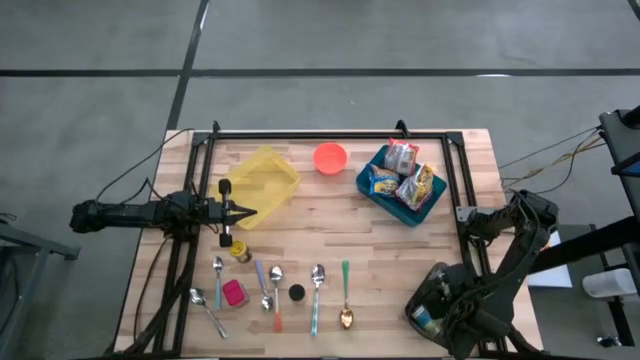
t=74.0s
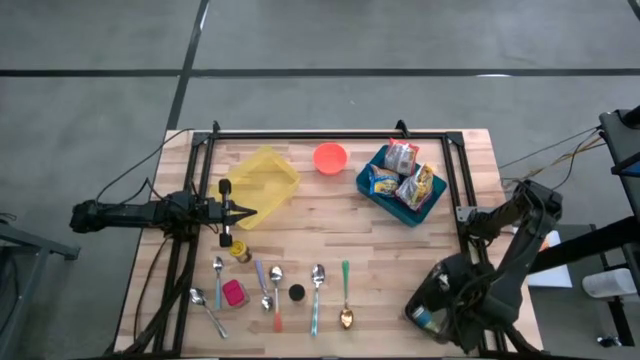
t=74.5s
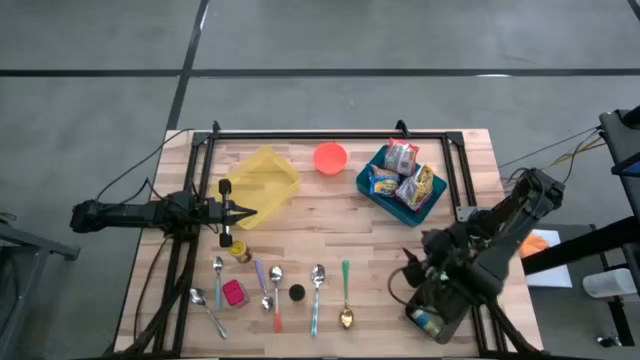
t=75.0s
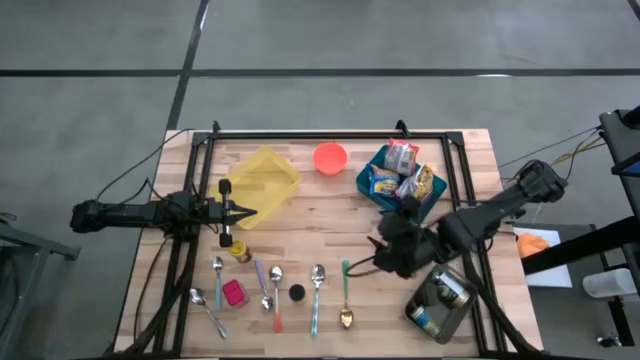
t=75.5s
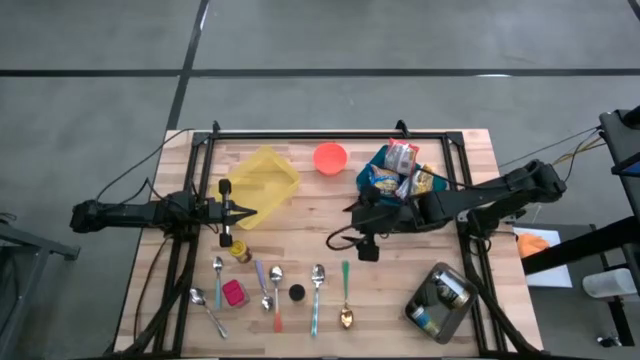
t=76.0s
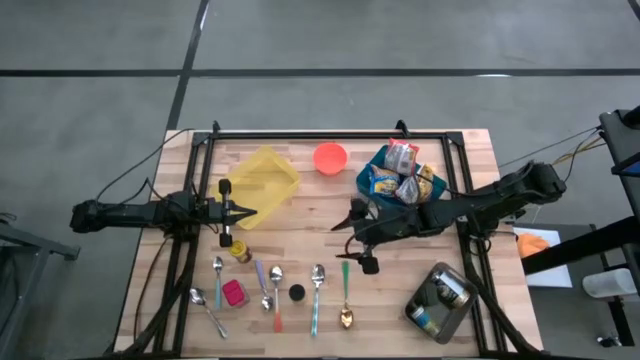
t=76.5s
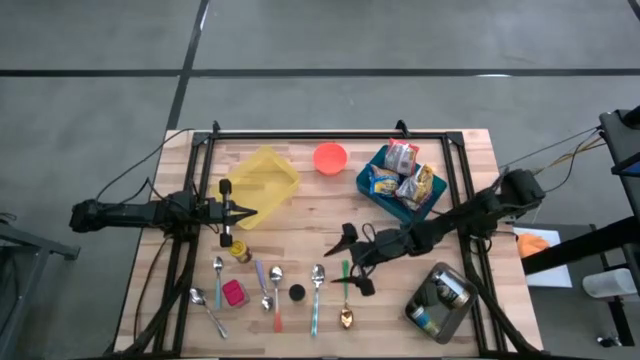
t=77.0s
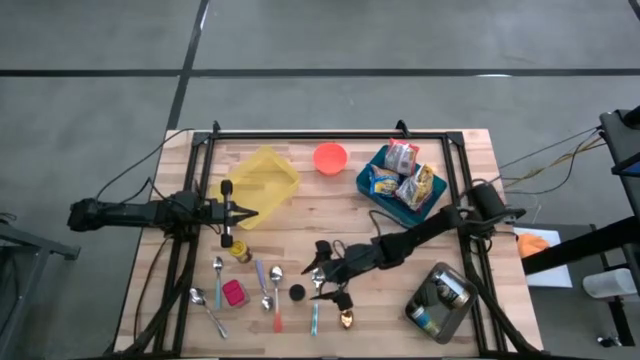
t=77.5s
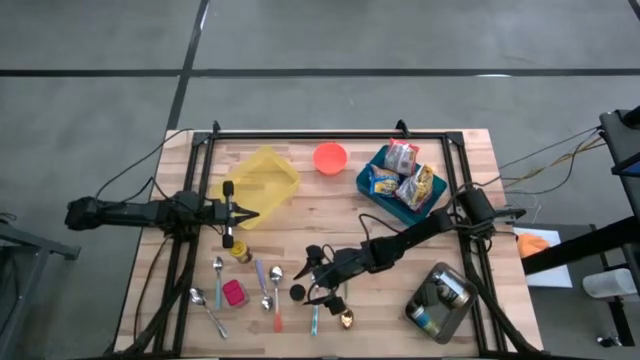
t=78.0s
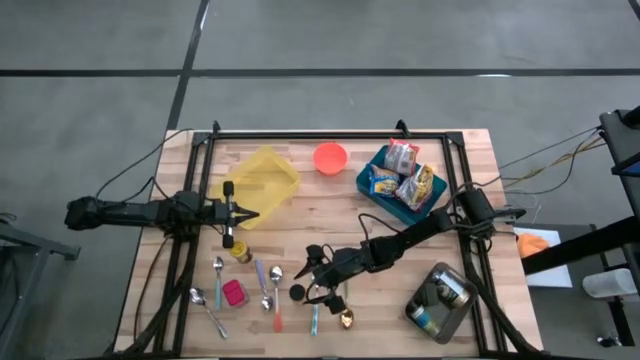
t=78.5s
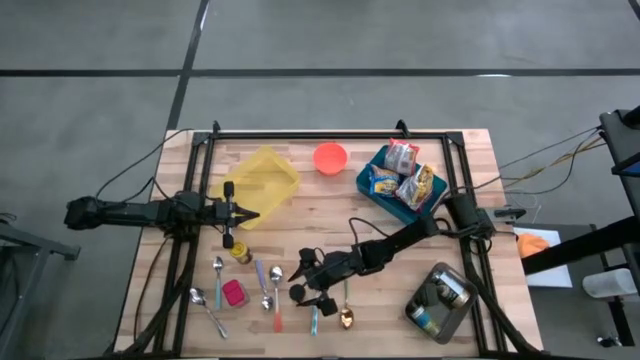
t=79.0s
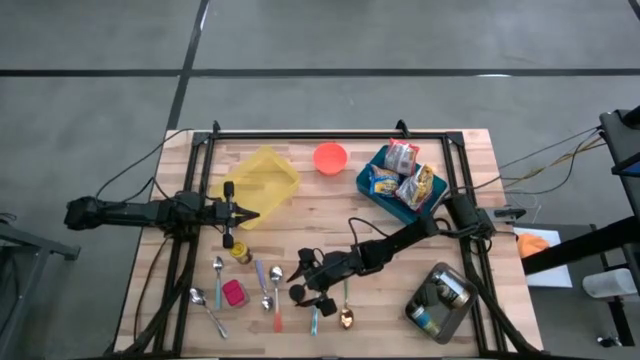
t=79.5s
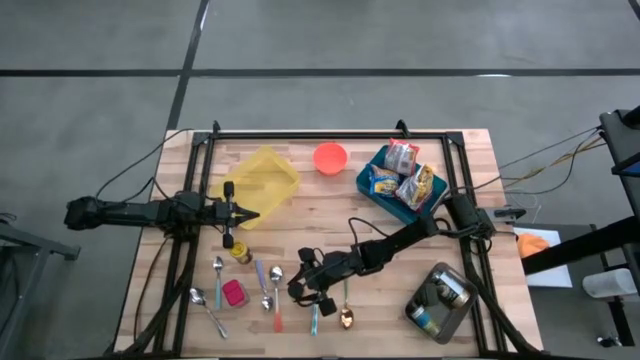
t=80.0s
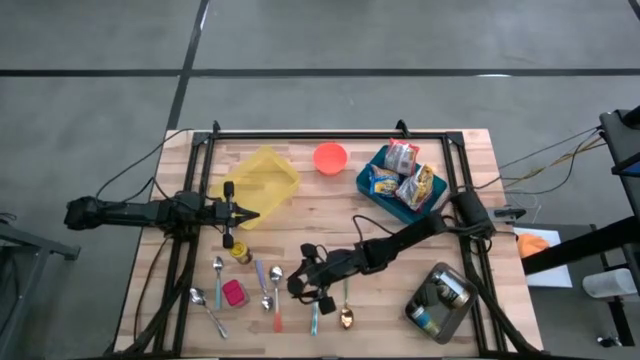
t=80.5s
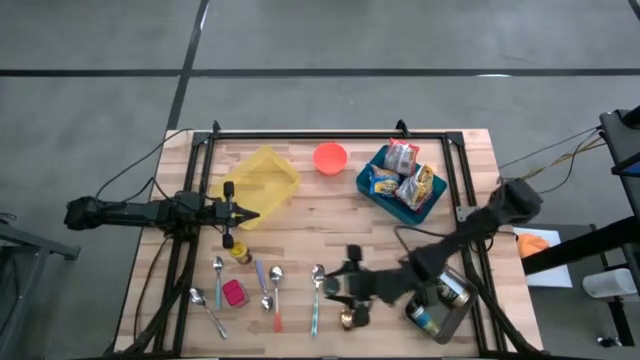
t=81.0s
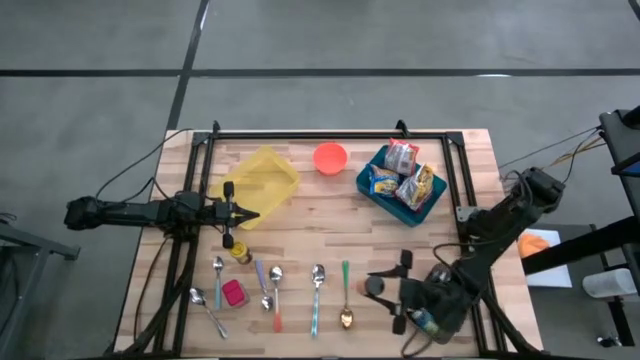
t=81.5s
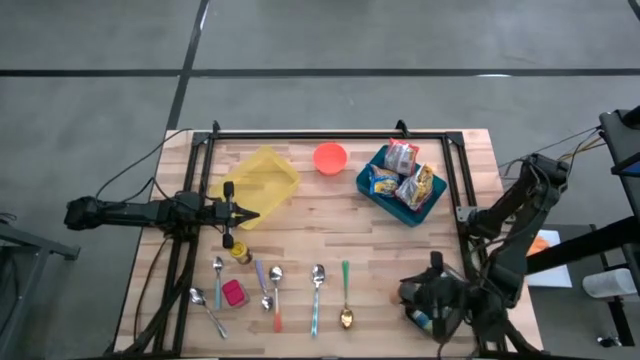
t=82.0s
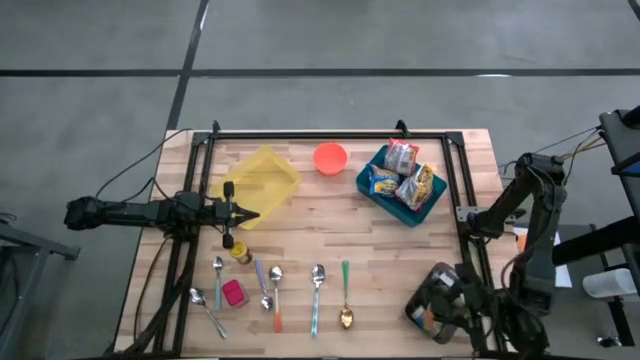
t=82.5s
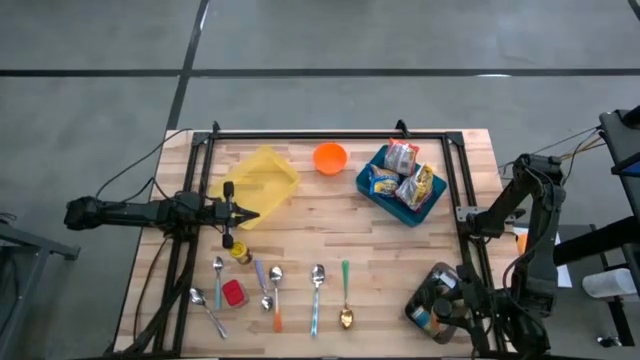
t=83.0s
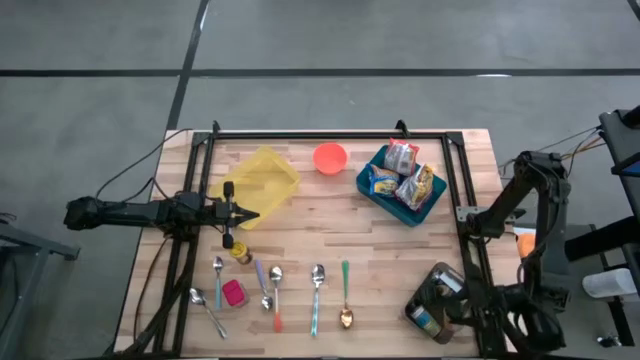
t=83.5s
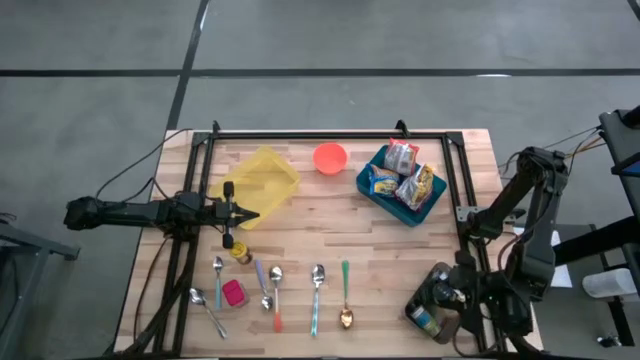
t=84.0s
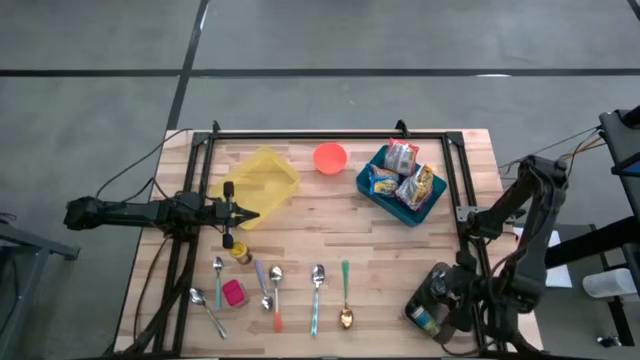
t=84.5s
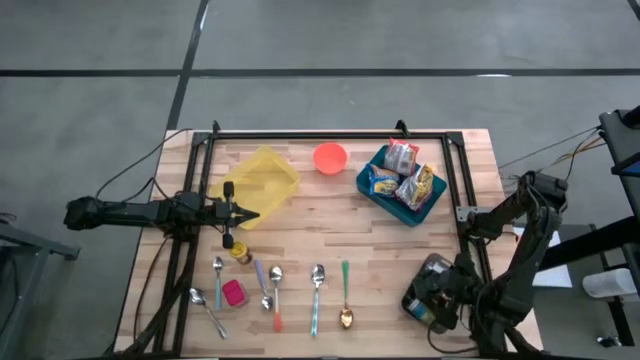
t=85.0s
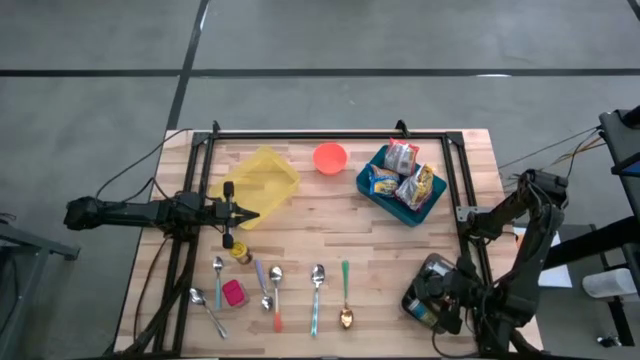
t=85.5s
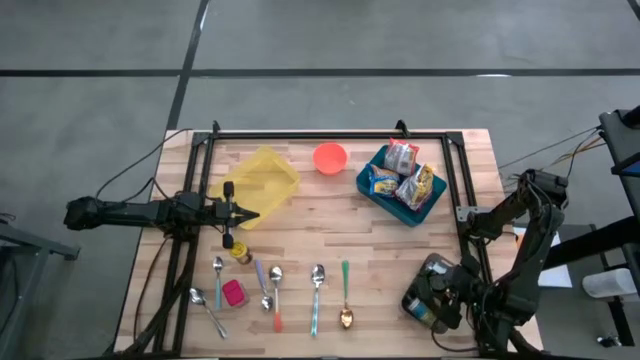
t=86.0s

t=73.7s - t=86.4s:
Put the orange seasoning bottle into the black bin

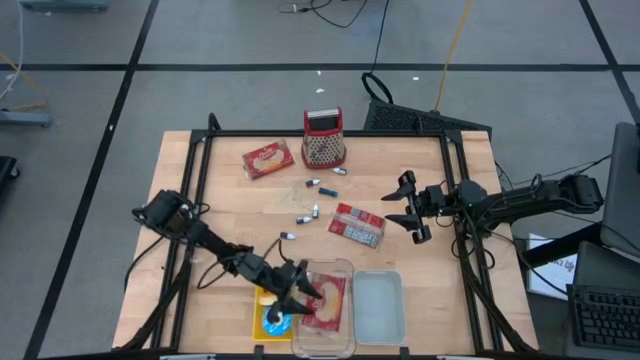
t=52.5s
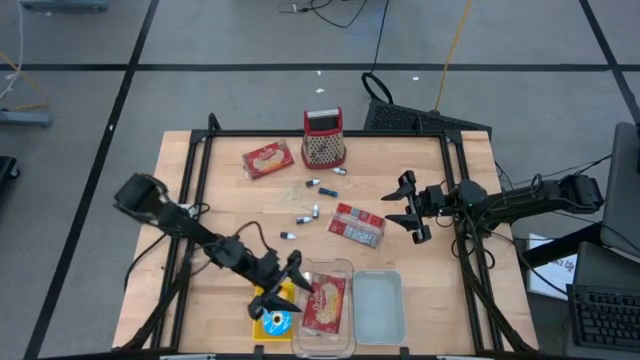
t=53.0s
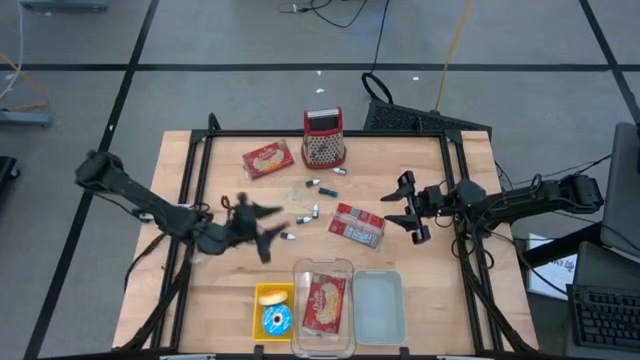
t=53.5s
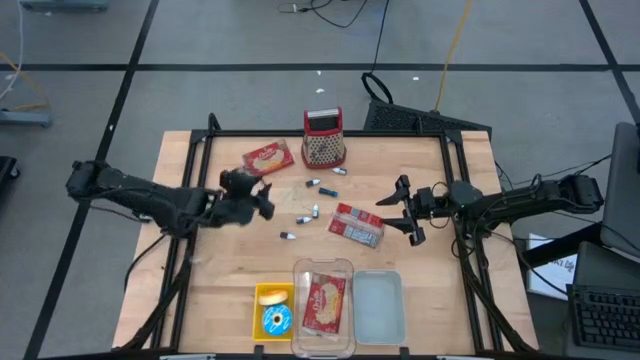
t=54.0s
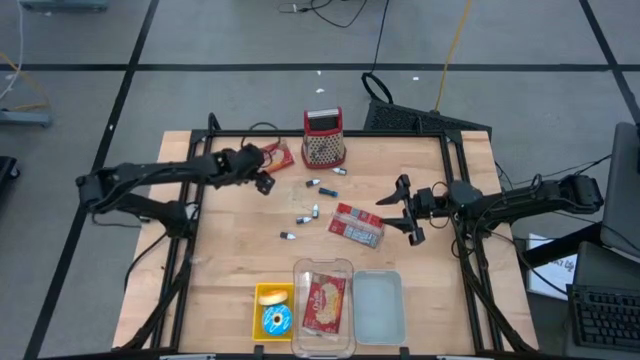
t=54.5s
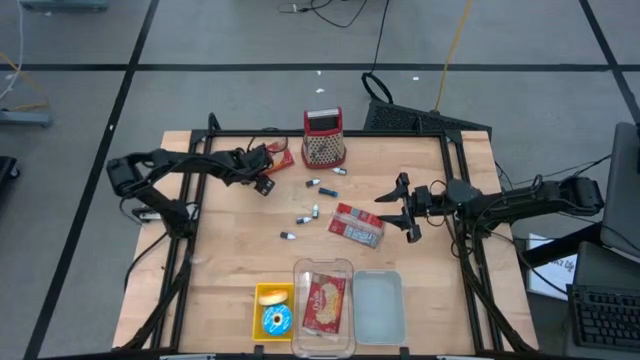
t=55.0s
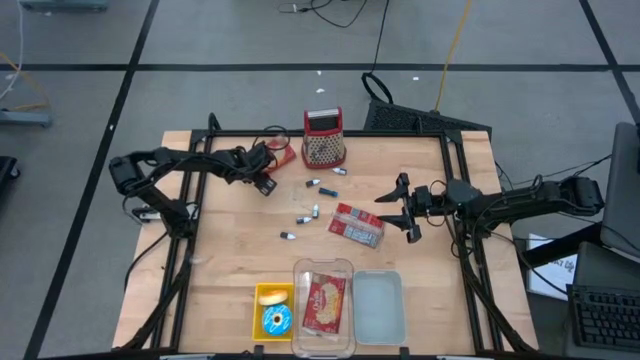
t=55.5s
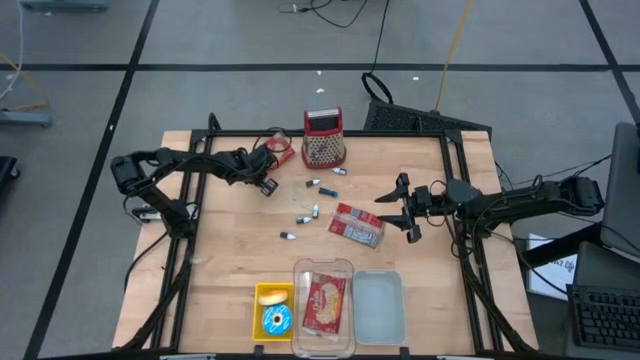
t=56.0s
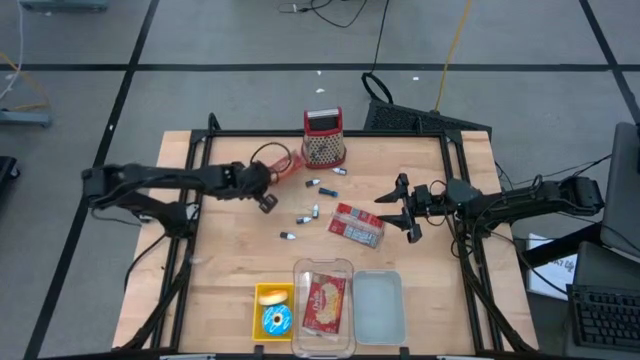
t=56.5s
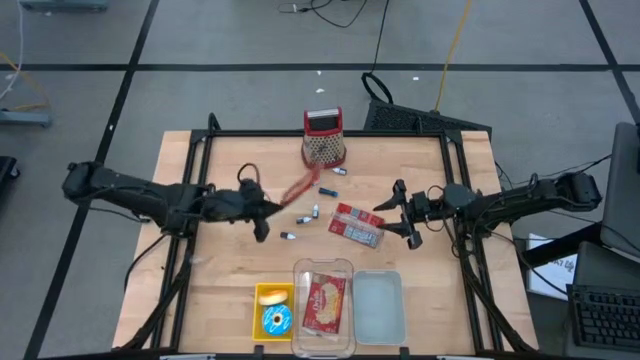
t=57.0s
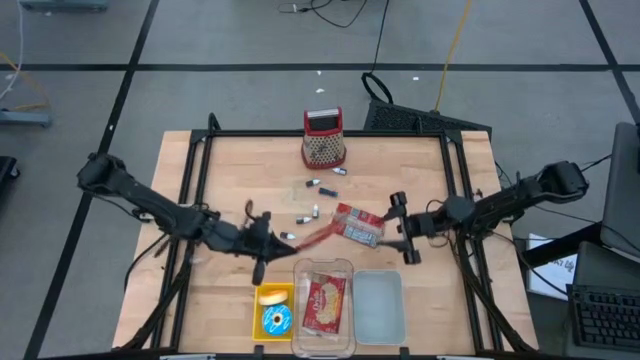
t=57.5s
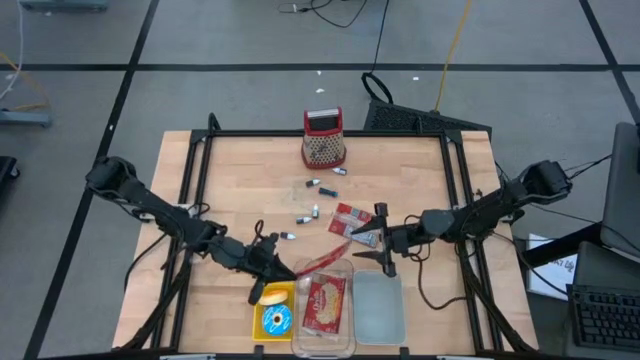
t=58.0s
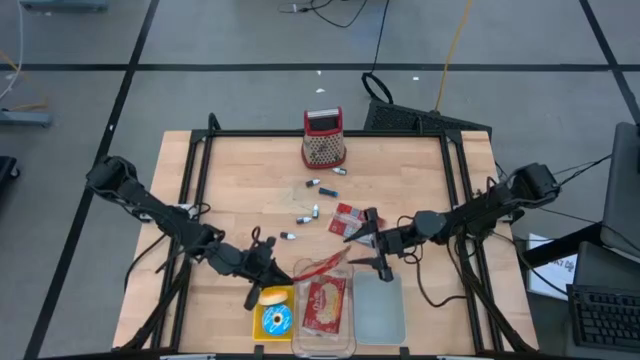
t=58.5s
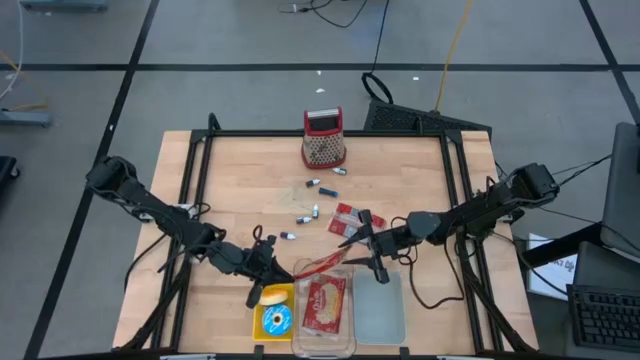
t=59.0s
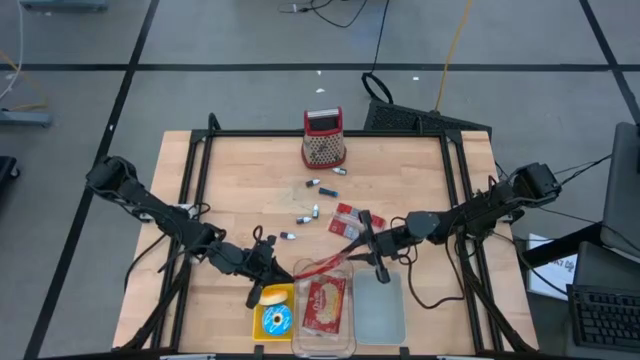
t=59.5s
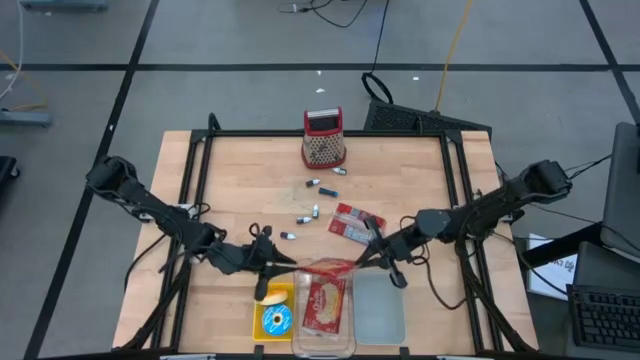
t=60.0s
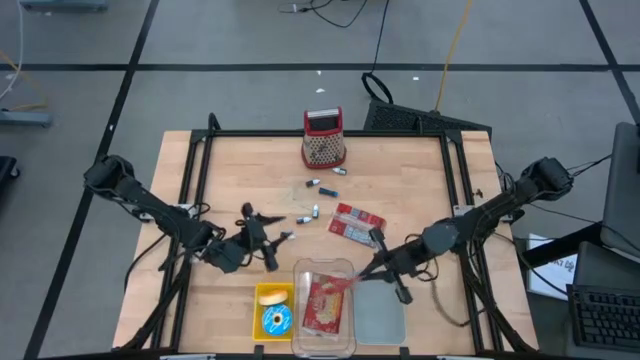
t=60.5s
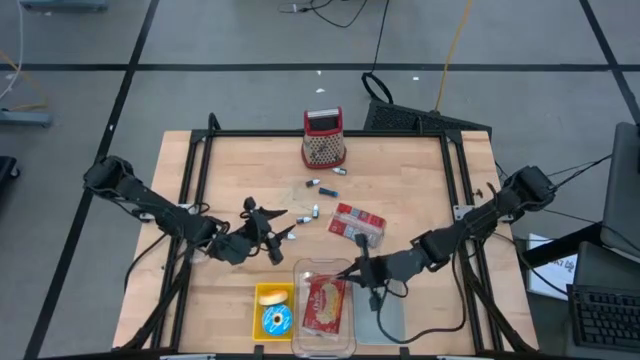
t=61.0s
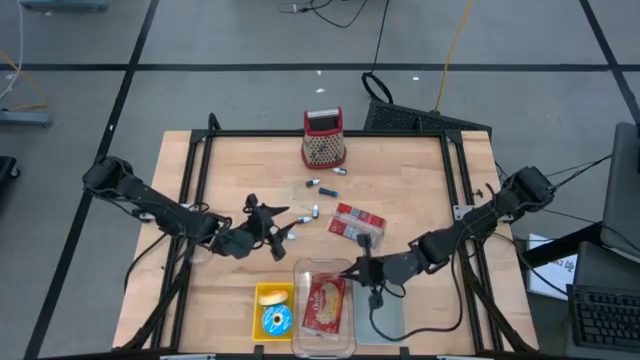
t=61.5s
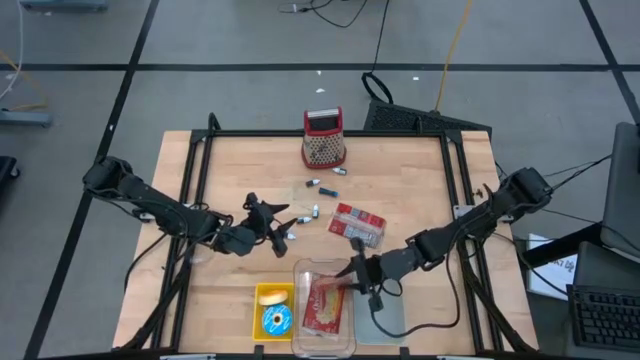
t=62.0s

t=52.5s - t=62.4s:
Put the top popcorn bag into the transparent bin
